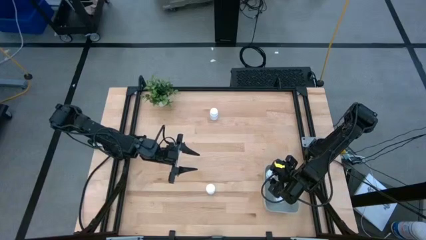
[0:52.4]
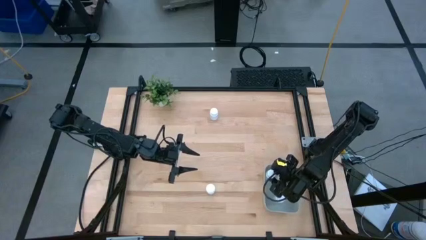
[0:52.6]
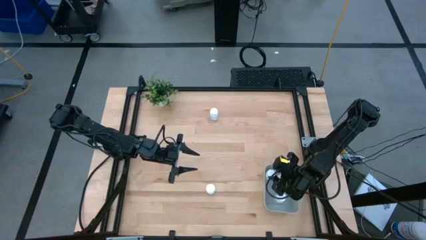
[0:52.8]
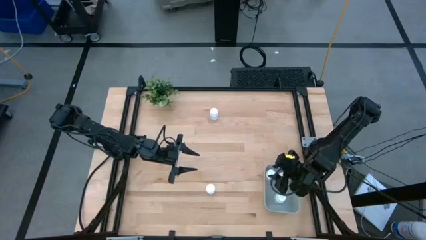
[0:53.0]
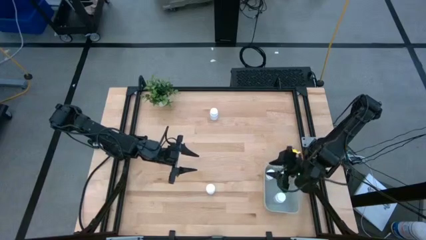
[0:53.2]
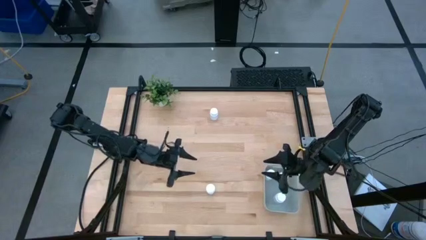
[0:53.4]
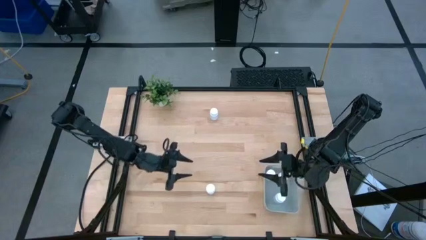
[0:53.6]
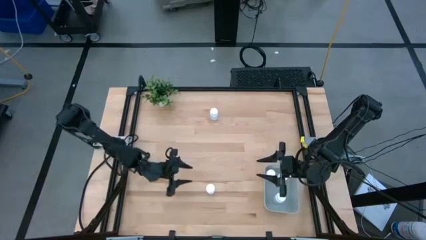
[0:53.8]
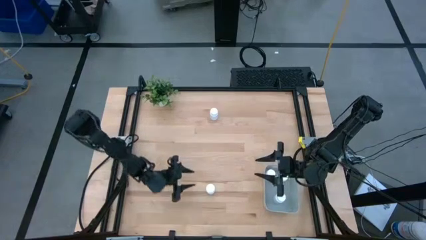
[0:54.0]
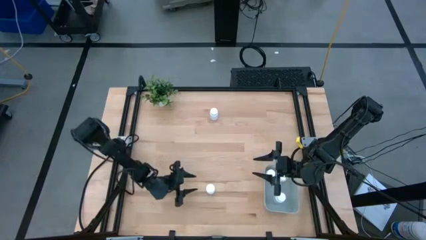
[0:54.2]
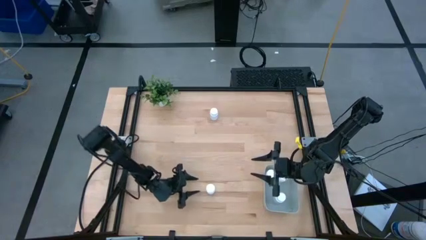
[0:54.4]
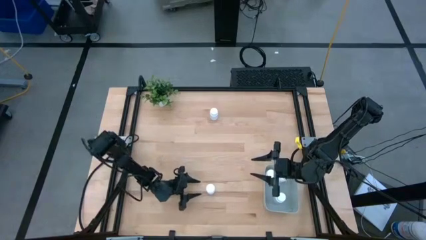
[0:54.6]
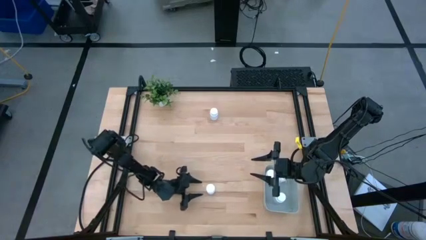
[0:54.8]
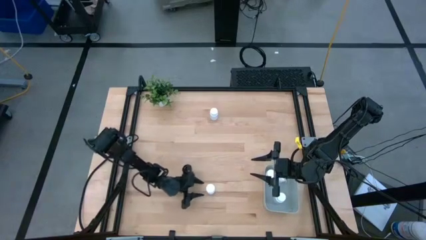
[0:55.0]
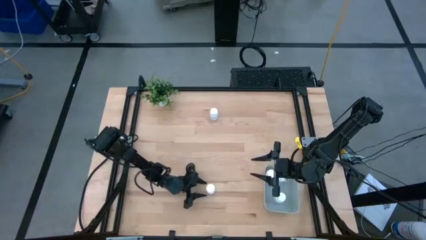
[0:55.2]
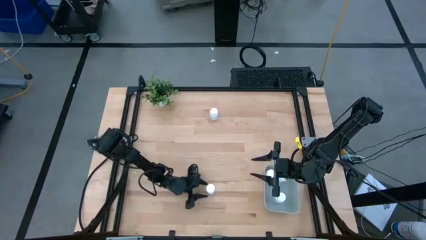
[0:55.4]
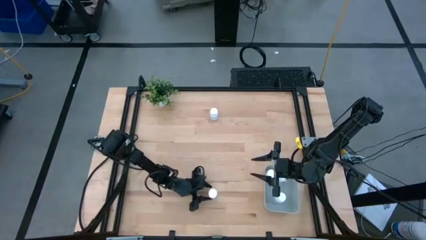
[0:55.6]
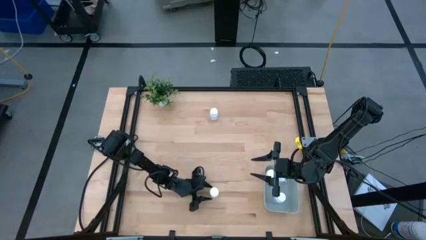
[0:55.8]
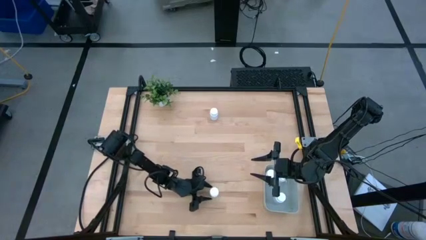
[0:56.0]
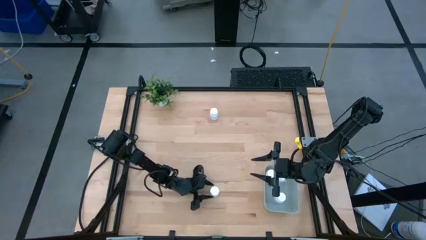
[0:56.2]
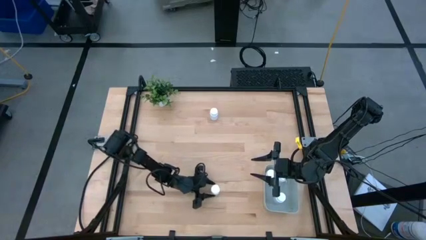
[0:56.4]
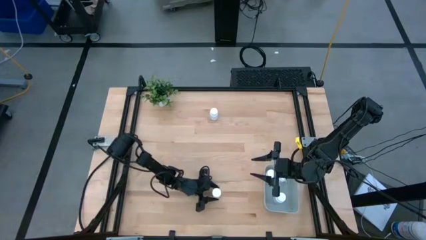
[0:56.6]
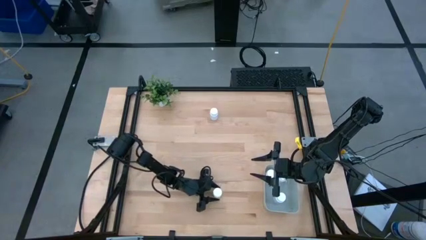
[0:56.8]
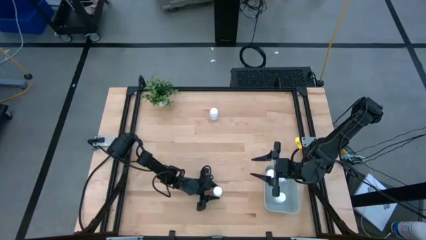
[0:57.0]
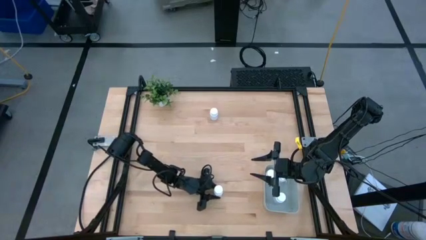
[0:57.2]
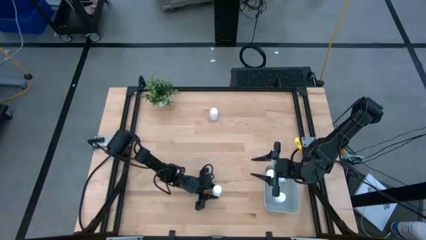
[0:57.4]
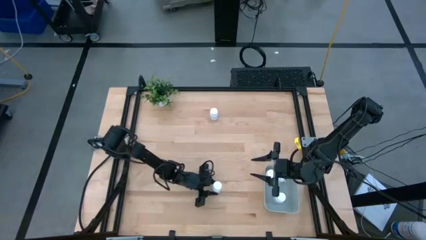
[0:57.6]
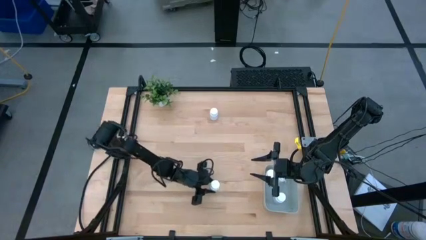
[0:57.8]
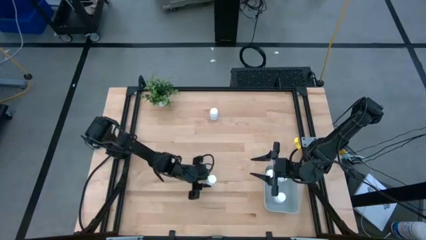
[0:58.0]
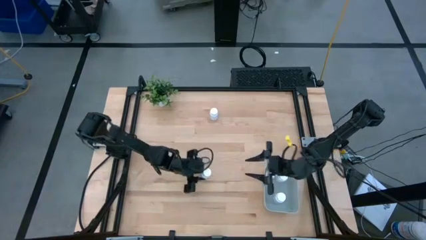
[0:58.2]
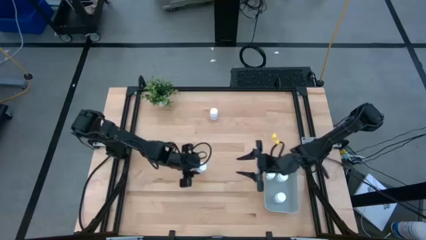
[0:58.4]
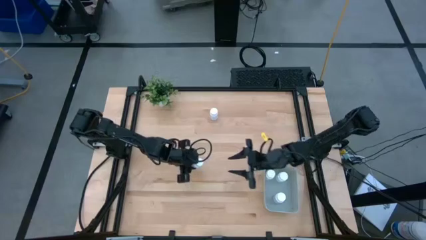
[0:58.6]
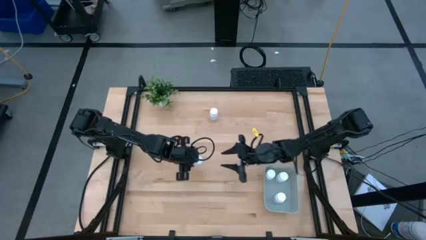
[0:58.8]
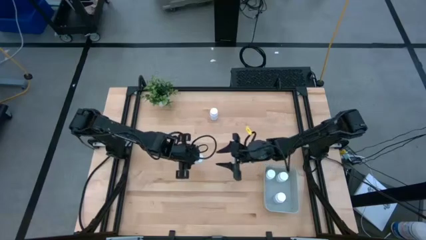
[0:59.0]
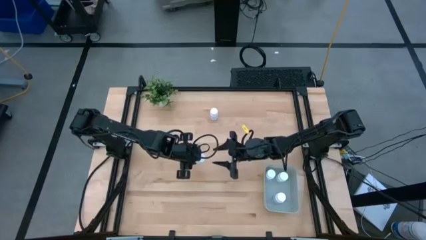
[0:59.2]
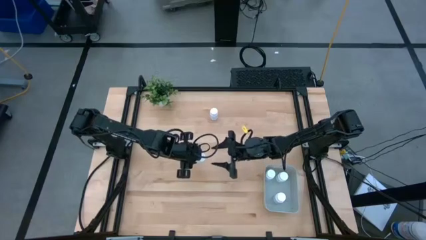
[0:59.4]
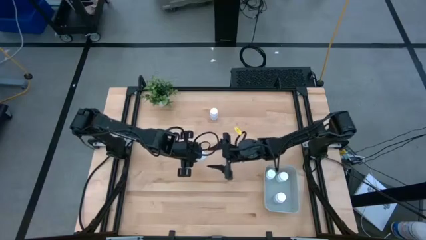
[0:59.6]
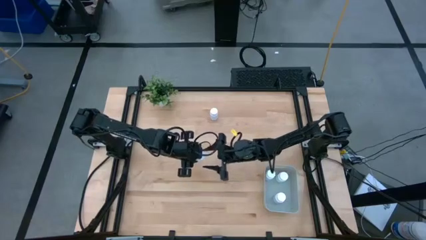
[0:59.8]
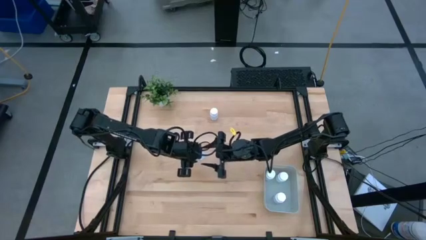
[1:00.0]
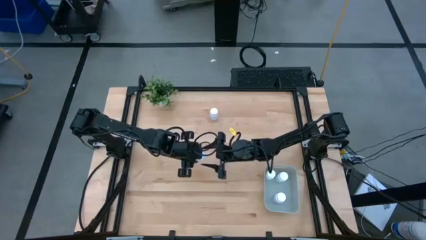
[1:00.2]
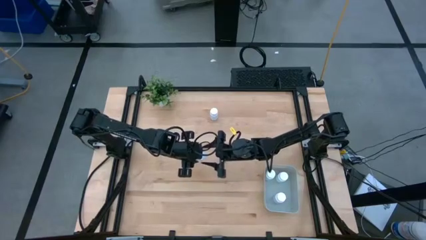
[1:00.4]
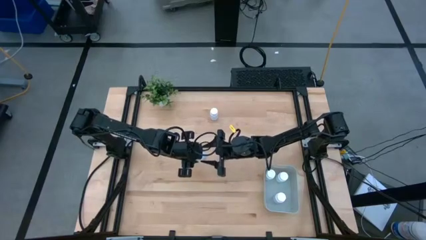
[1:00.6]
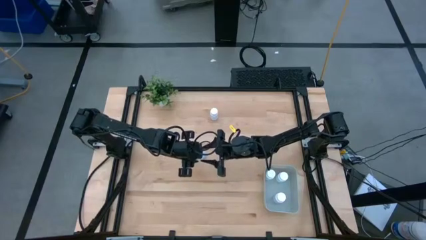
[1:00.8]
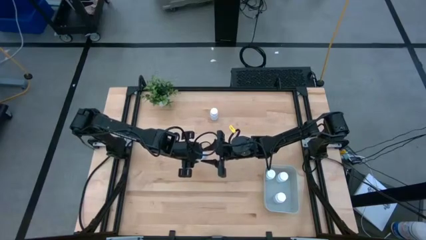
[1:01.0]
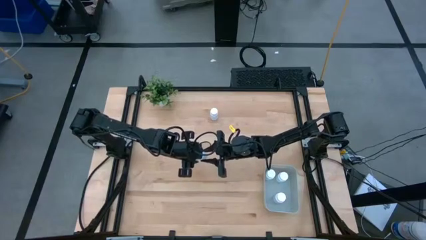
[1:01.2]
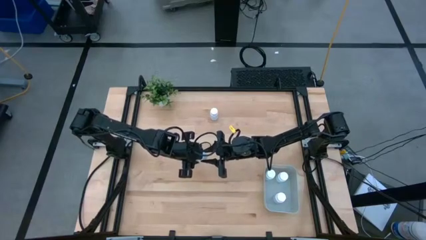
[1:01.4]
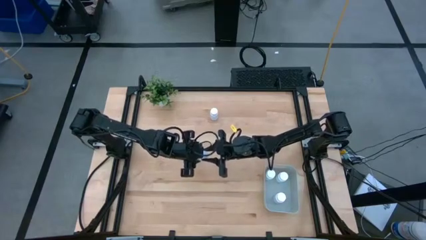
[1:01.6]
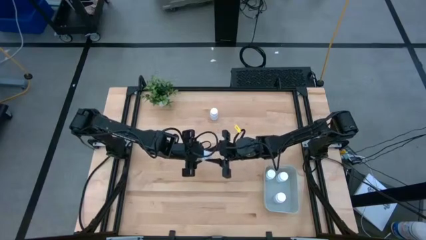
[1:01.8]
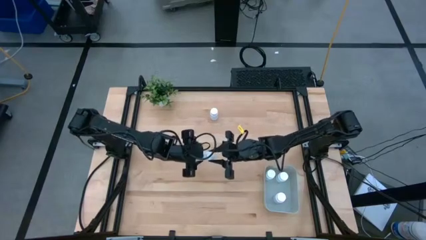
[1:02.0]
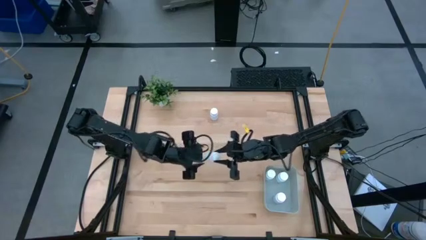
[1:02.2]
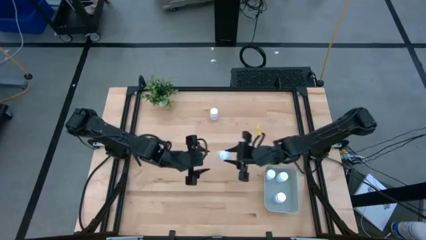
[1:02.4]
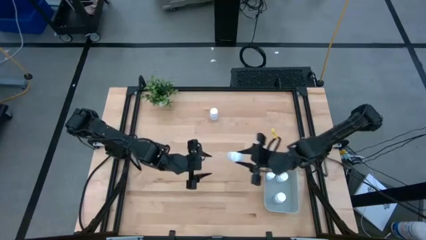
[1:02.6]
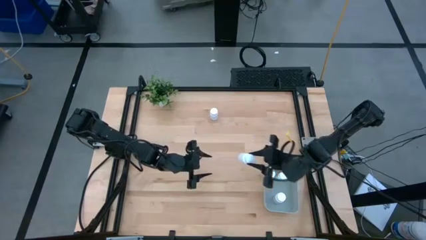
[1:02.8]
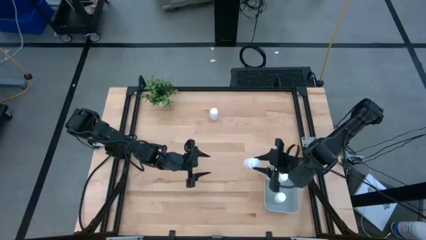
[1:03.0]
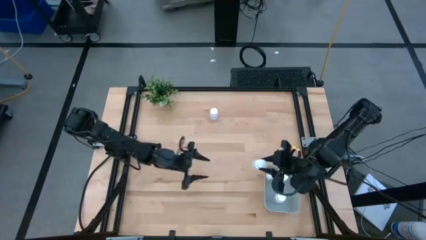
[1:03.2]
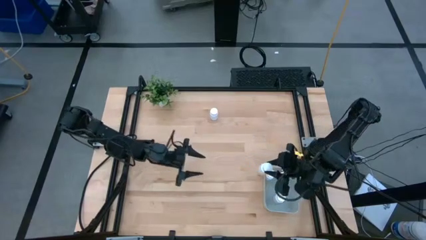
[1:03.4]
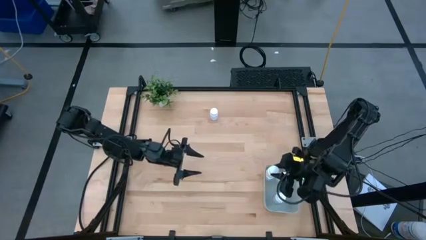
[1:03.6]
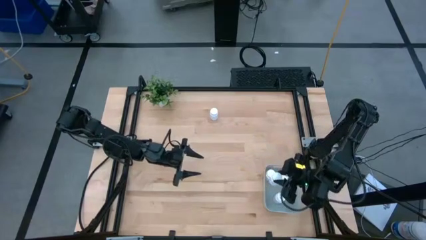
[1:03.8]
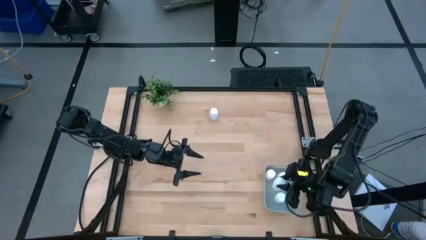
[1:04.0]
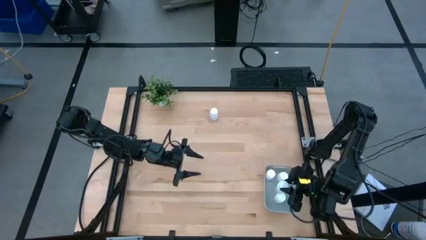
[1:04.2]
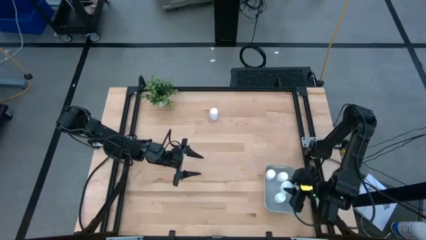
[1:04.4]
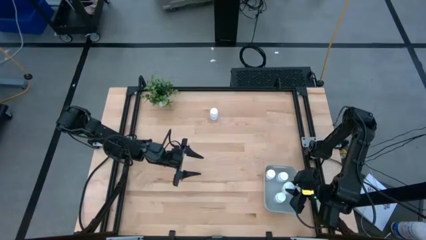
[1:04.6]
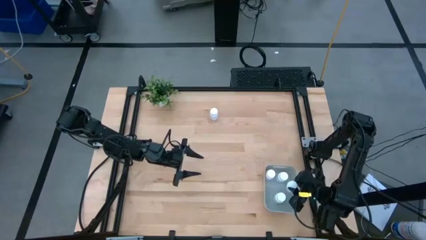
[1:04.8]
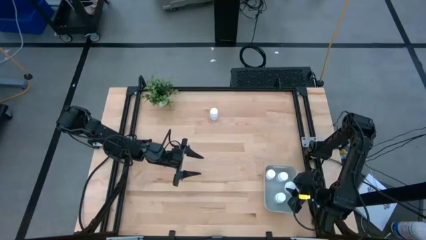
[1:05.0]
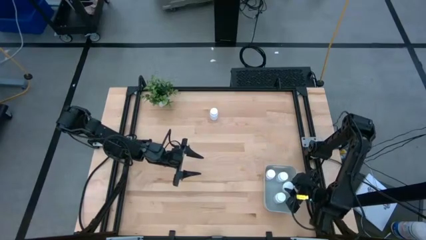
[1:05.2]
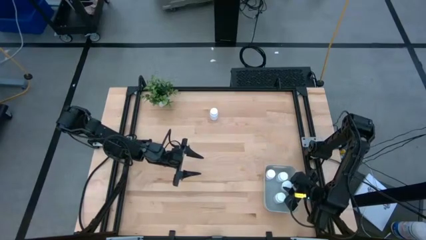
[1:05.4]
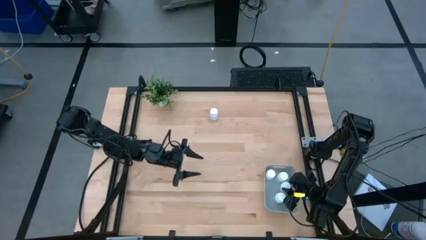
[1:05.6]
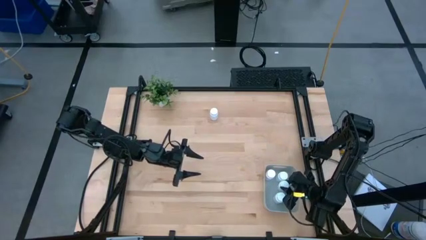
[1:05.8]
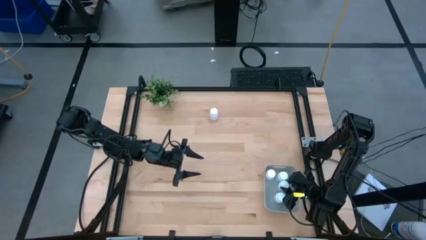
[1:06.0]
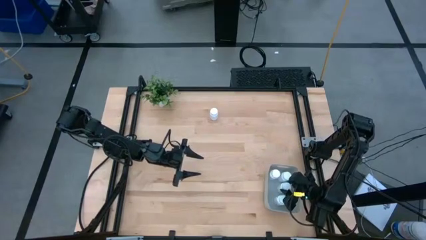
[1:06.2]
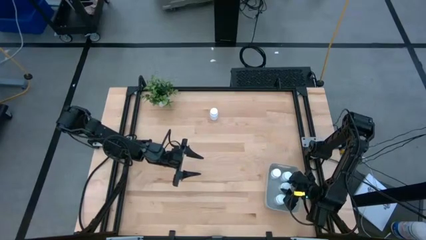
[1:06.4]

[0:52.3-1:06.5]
Task: Pick and place pill bottles into a basket
Put the white pill bottle into the gray bin

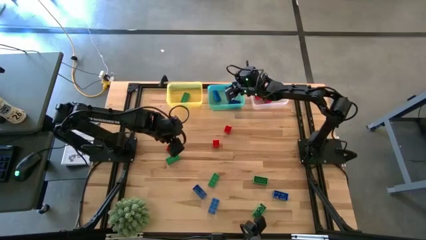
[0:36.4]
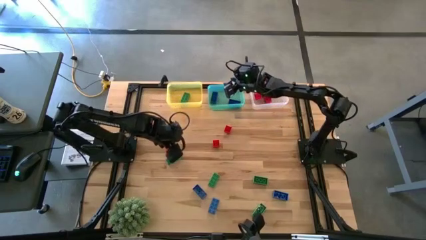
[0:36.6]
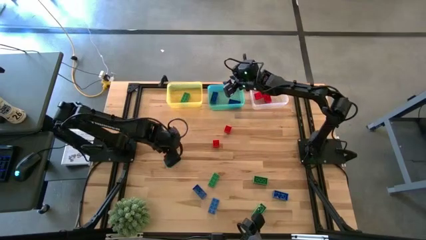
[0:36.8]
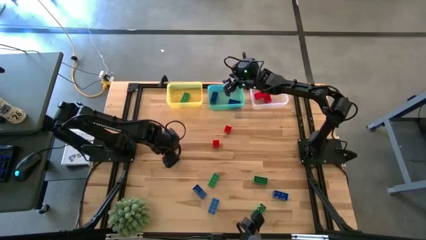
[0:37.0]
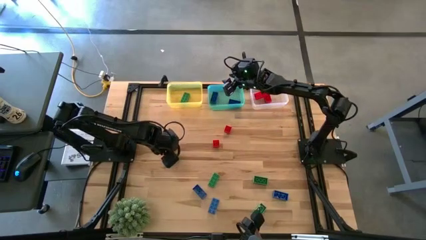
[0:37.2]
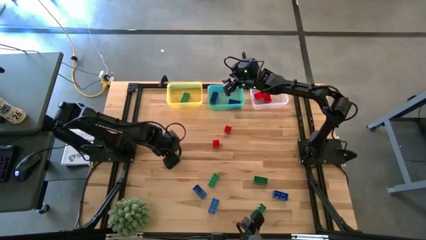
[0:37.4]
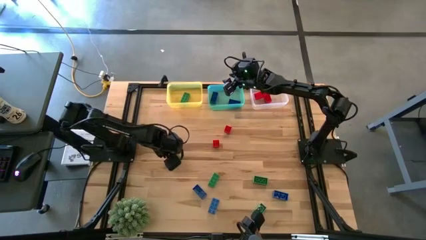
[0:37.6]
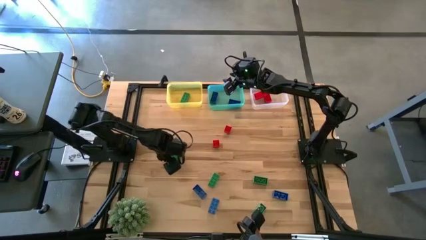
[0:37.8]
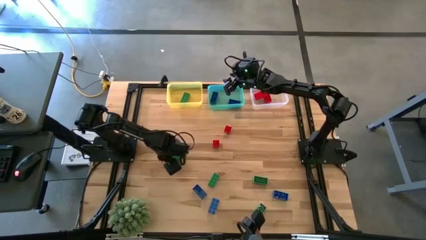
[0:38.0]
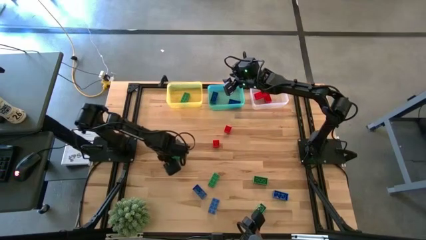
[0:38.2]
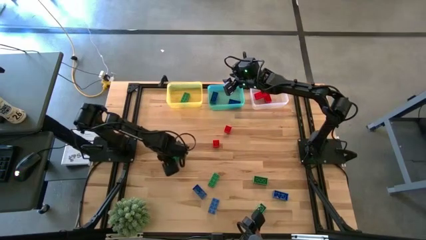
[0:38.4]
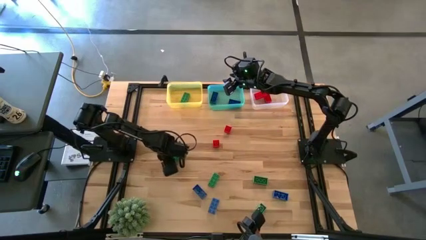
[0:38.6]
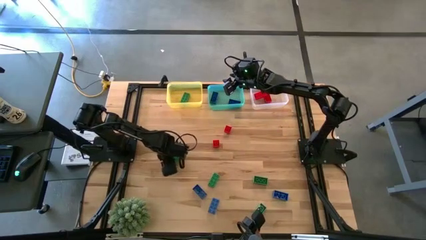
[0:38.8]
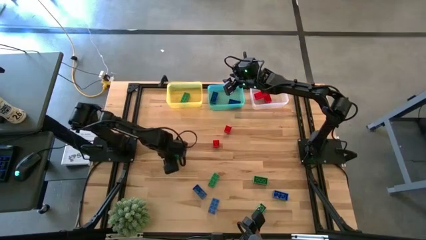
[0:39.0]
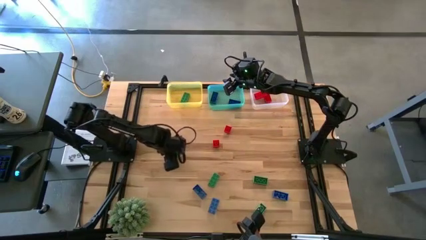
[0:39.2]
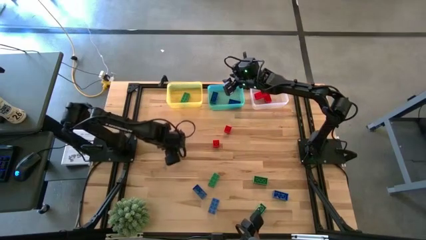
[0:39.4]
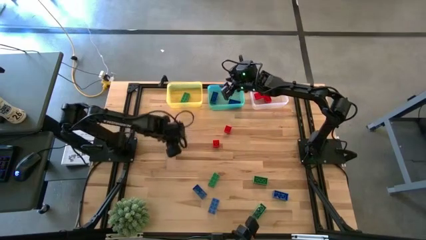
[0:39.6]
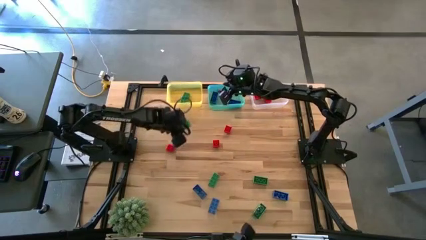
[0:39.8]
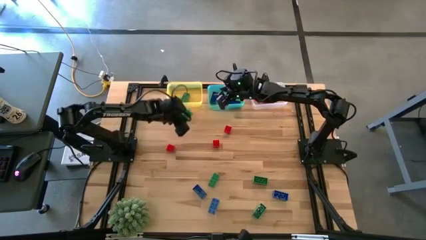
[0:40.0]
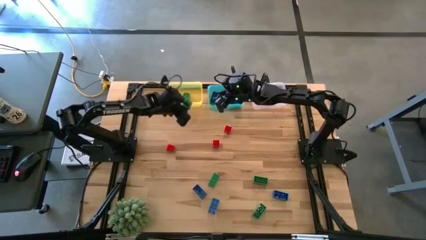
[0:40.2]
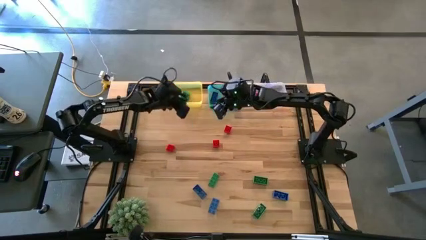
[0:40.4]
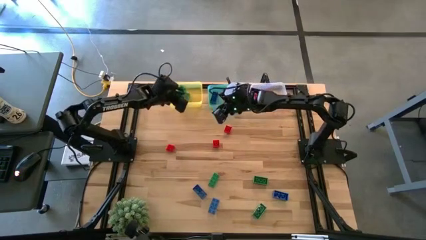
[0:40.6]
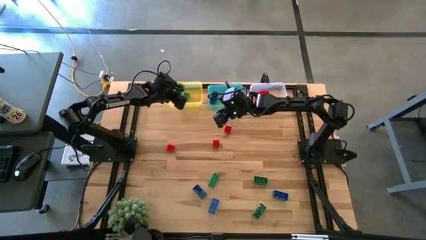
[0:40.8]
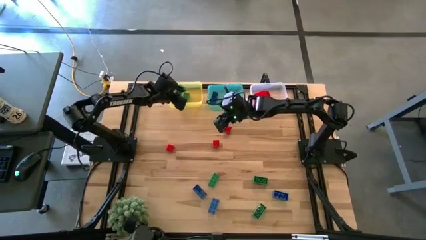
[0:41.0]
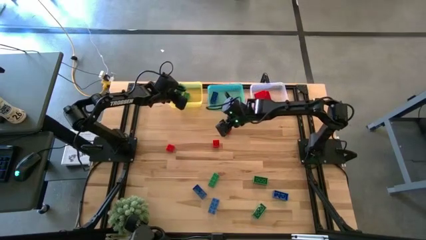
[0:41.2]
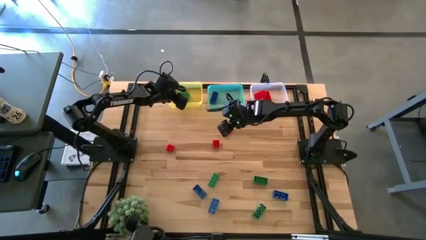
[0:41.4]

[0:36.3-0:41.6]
Task: Sort & place blocks by color
Put the green game piece into the yellow bin
